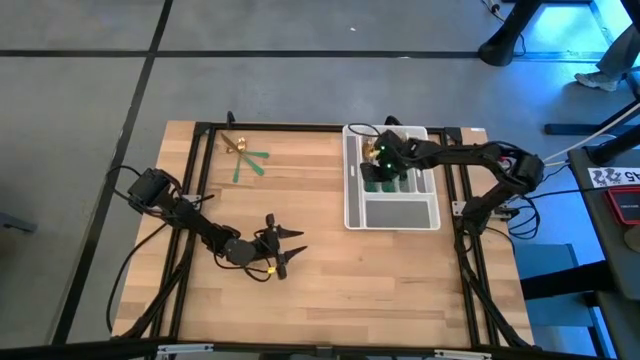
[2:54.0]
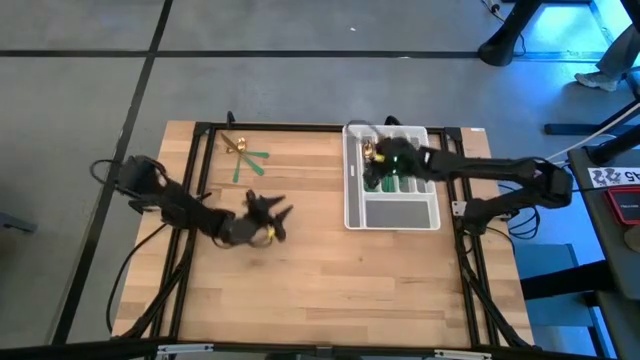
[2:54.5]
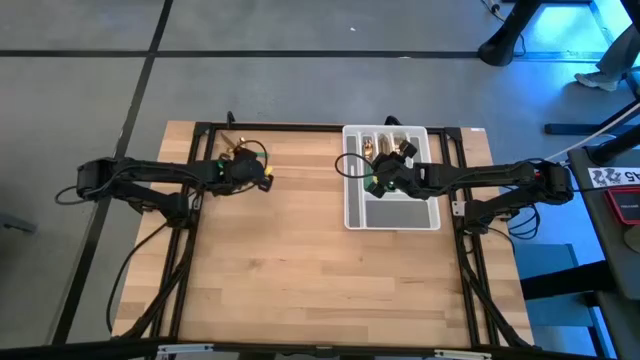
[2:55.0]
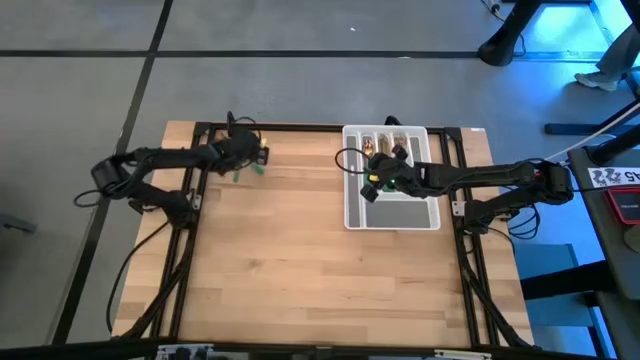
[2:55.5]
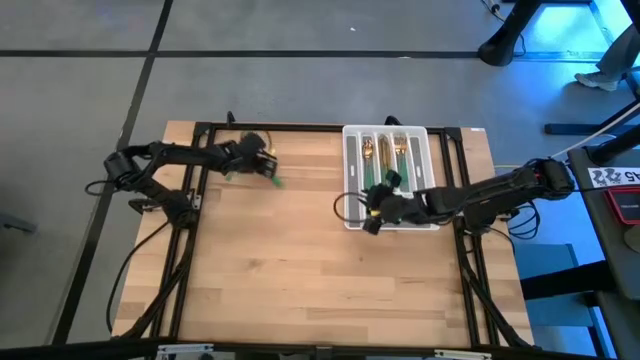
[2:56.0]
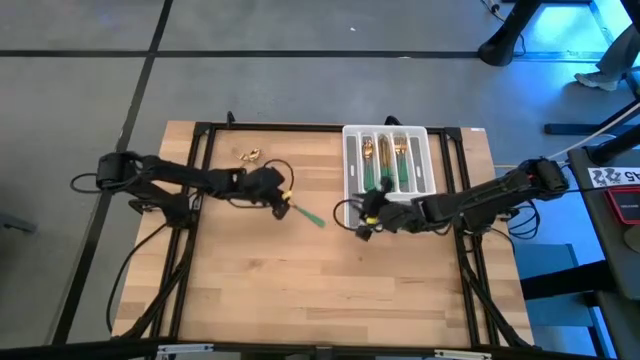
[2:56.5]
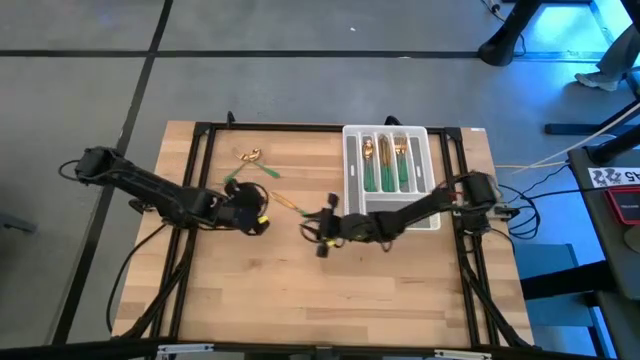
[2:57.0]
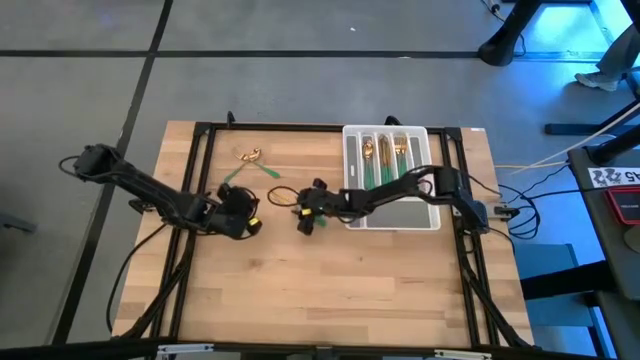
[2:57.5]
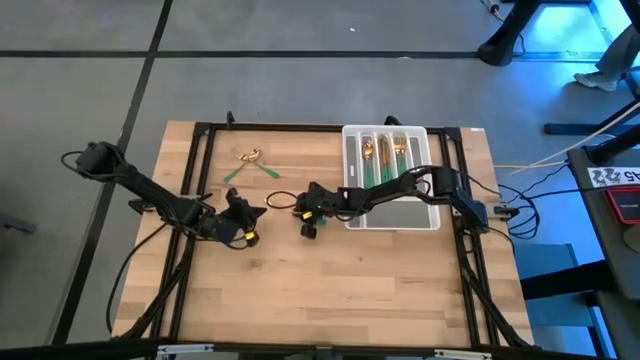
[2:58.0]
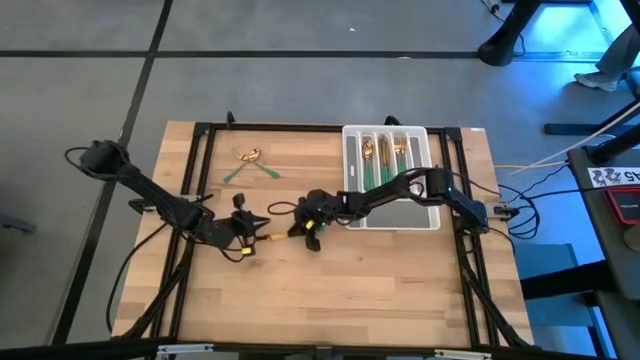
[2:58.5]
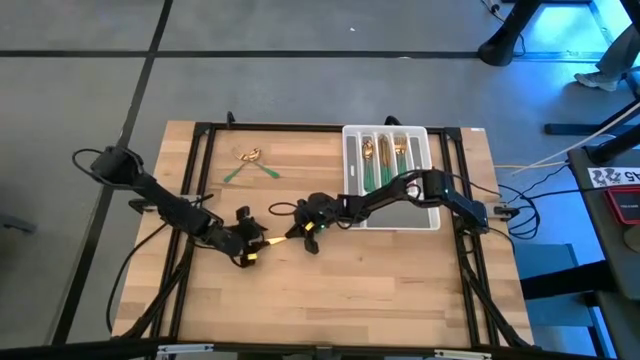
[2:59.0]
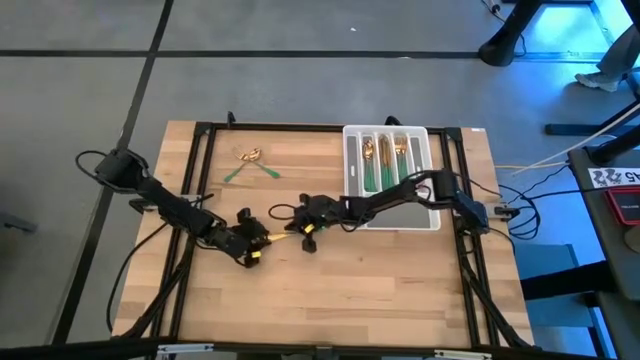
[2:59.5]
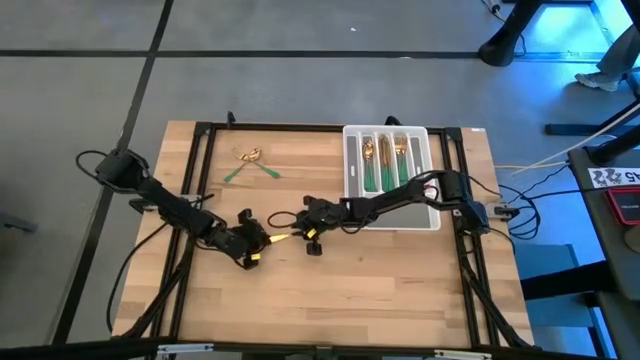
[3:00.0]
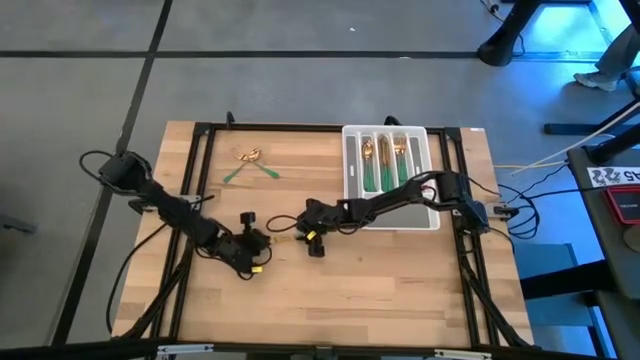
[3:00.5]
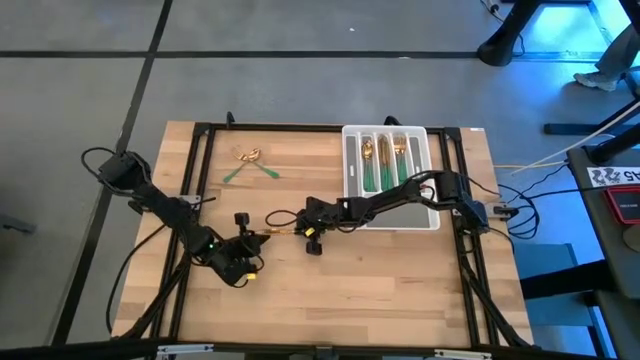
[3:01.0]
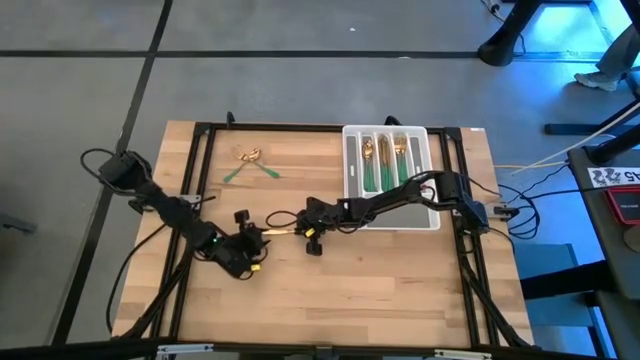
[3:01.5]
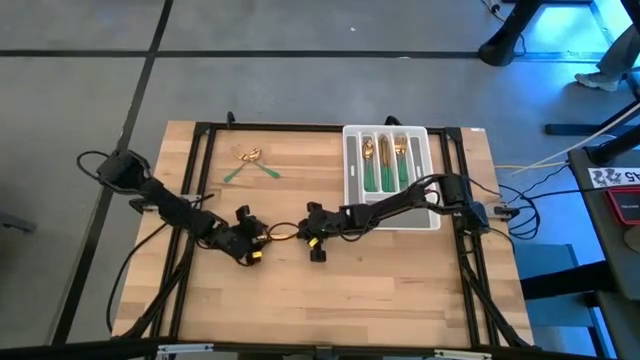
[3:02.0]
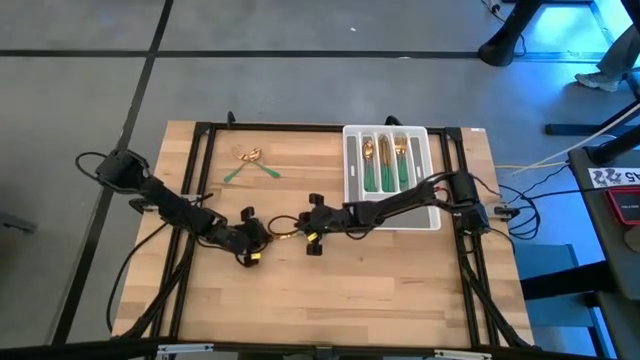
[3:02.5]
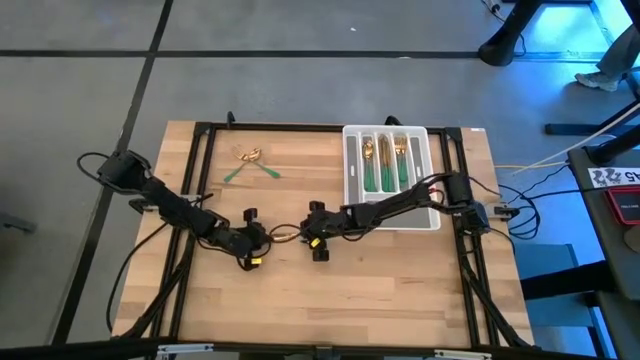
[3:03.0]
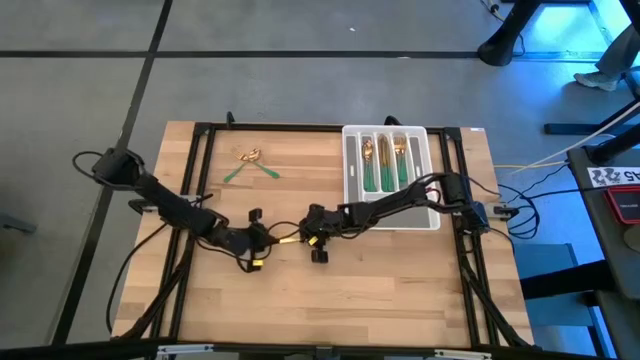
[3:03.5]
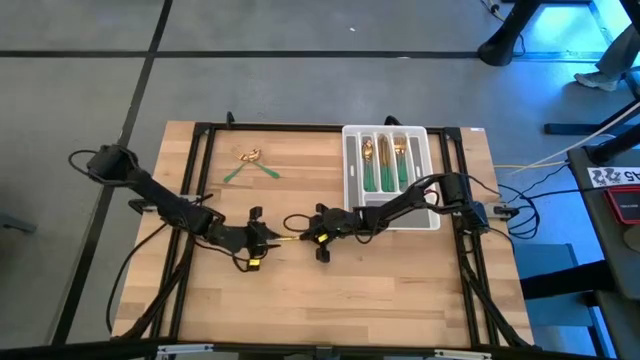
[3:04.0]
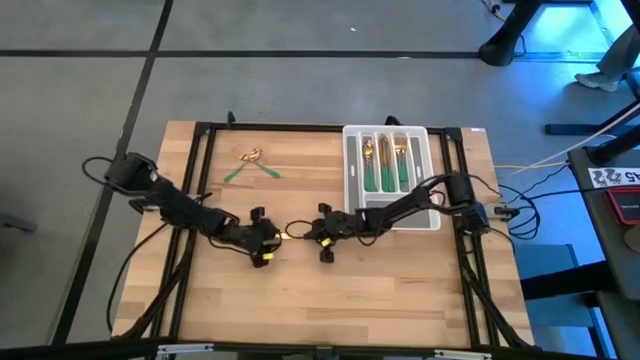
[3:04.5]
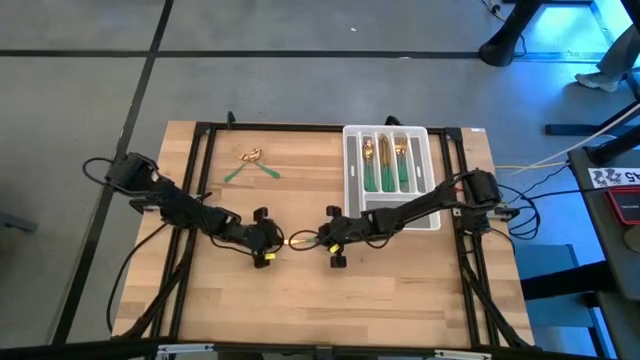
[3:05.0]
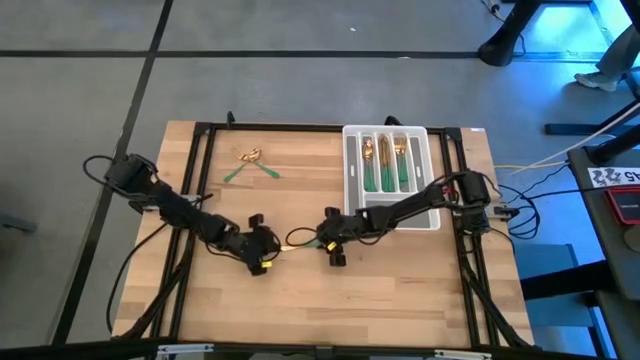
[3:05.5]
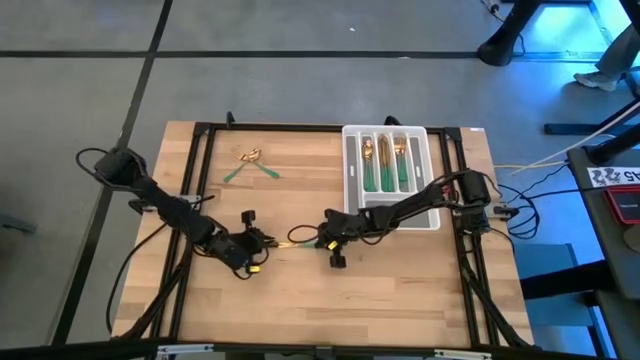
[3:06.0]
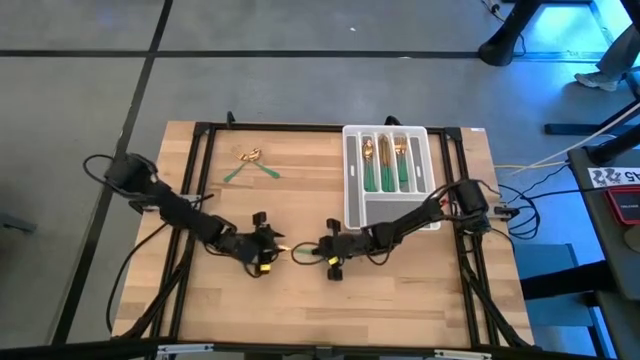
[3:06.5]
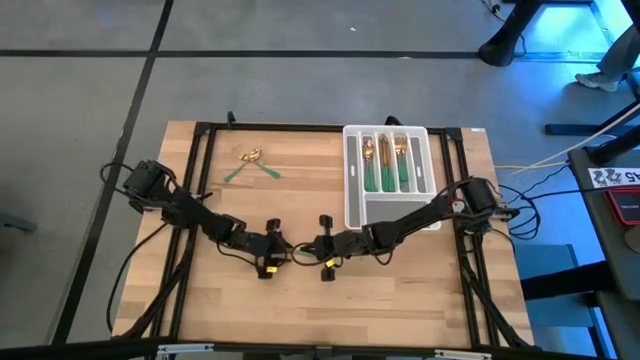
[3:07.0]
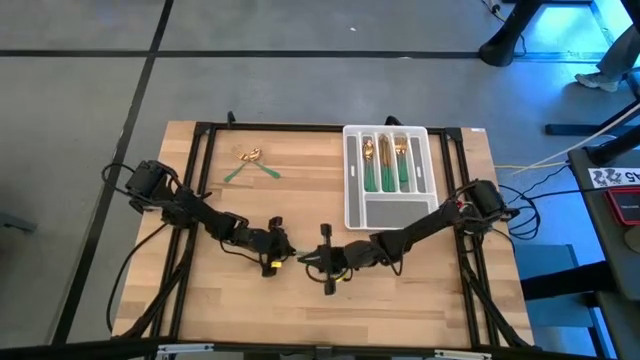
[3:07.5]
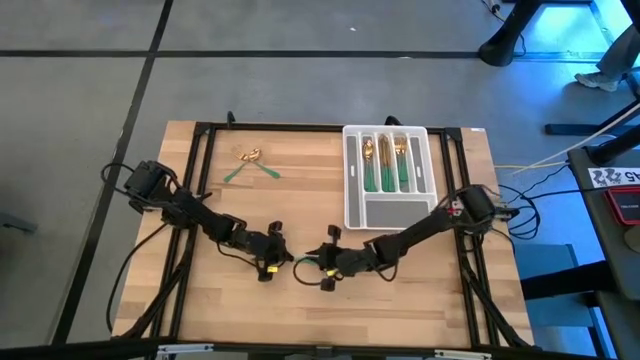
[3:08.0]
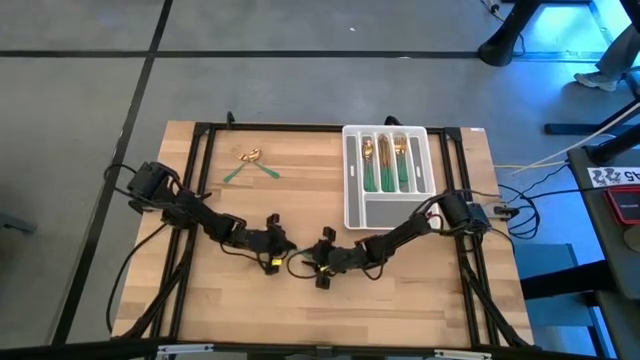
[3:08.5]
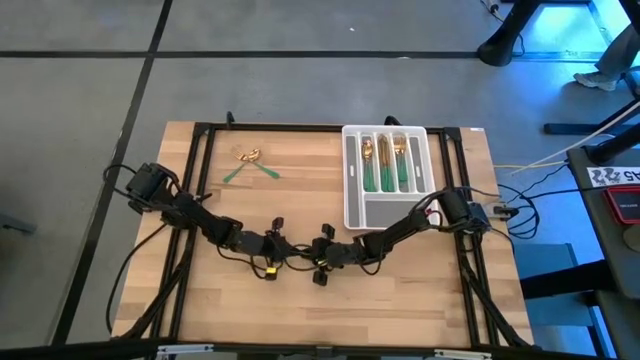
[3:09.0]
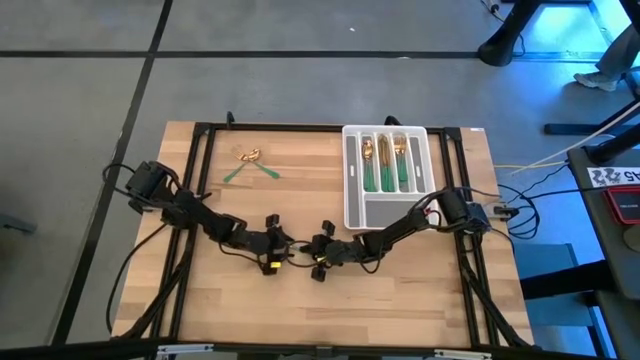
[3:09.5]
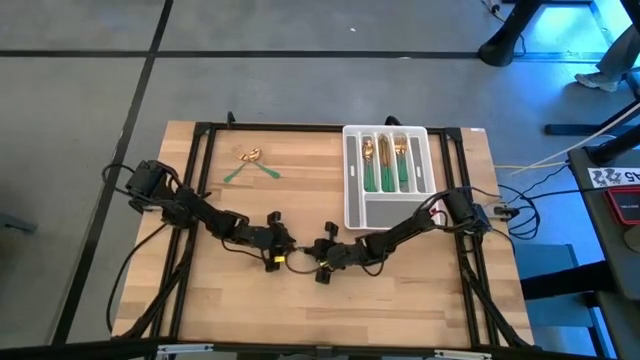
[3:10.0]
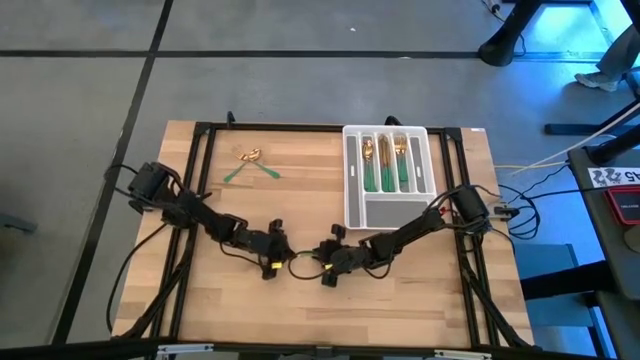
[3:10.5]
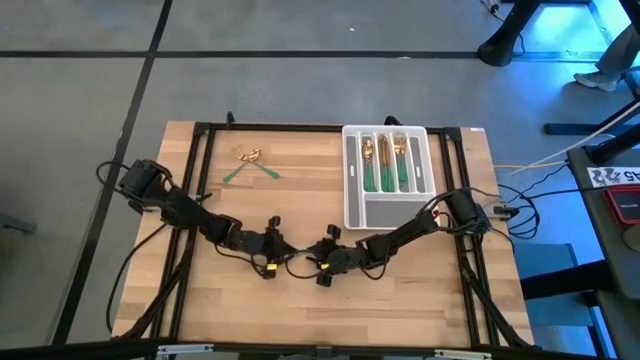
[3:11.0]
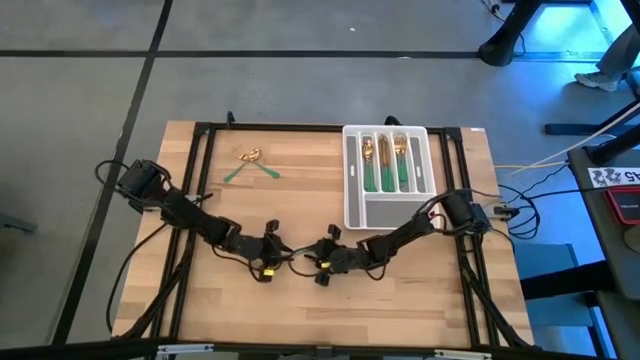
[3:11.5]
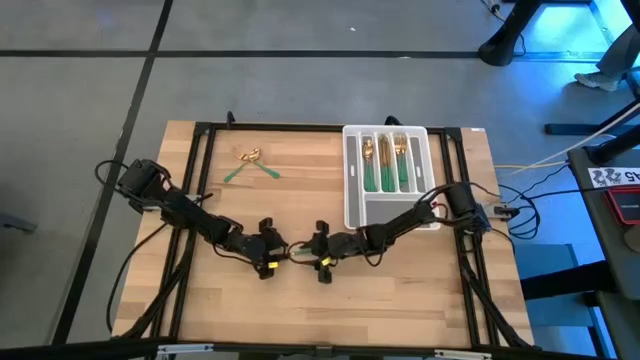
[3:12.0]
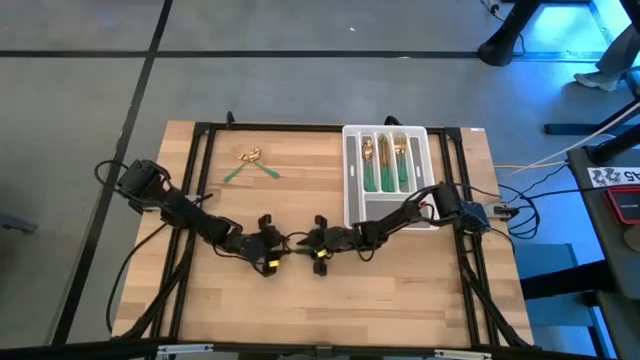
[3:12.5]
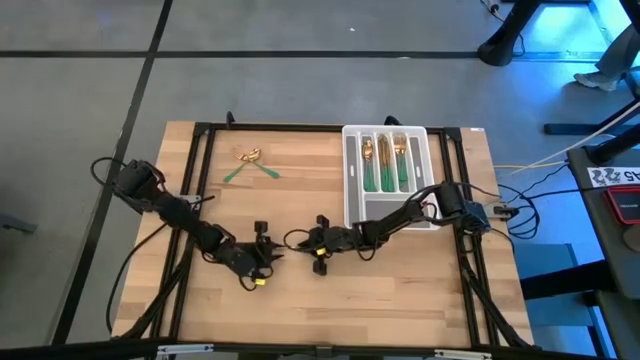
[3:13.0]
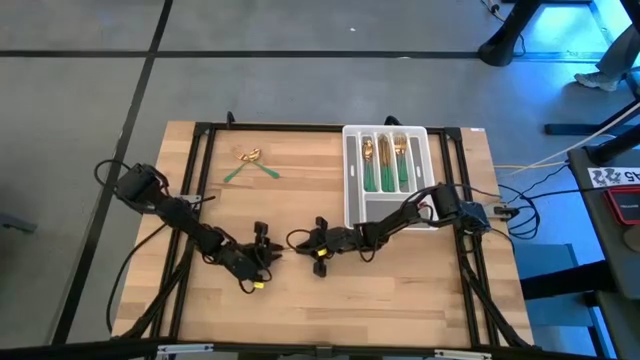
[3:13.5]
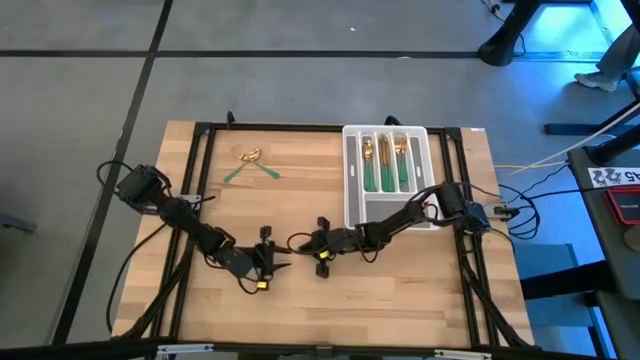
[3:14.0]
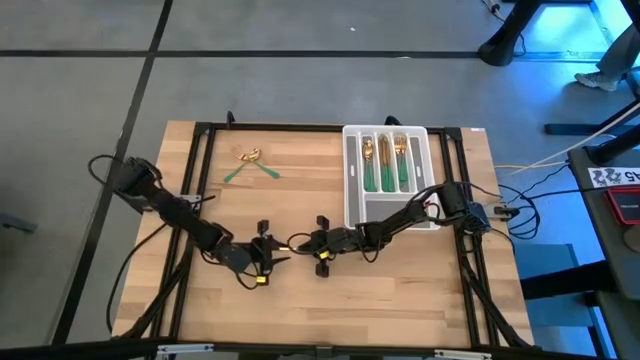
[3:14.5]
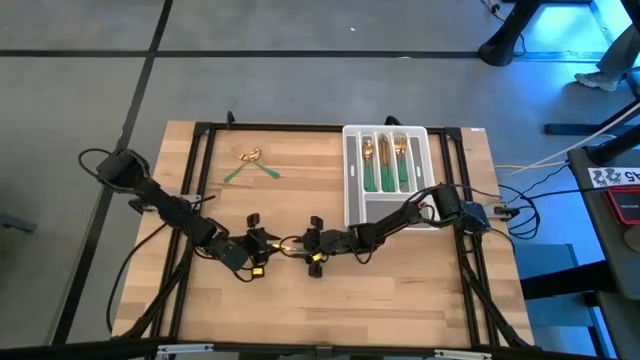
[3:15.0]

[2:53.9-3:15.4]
Task: Sort silverware
Put the green knife into the silverware tray

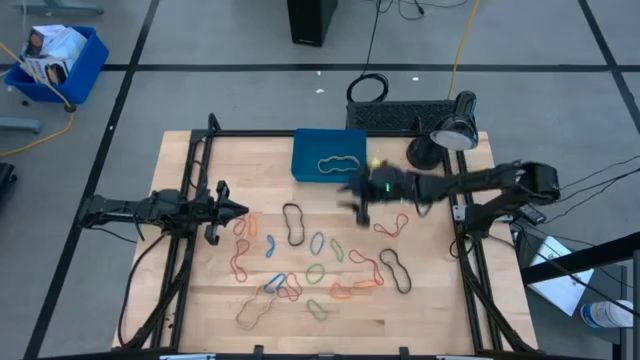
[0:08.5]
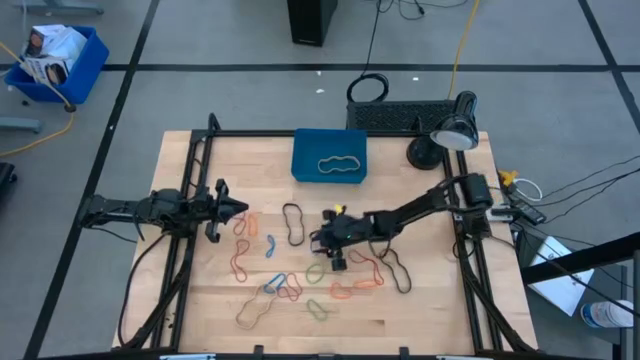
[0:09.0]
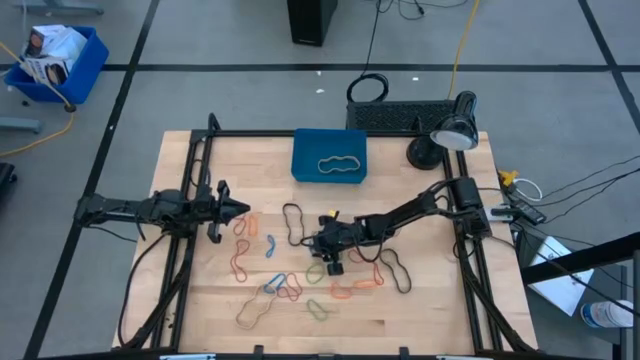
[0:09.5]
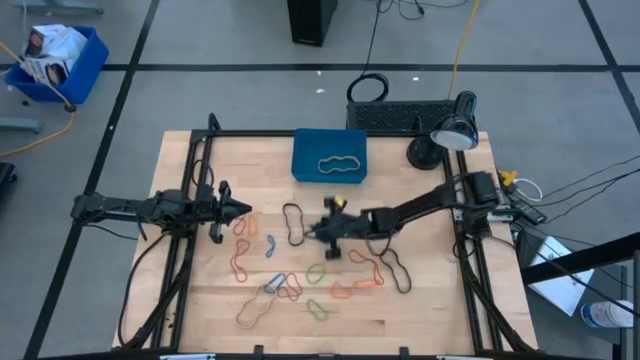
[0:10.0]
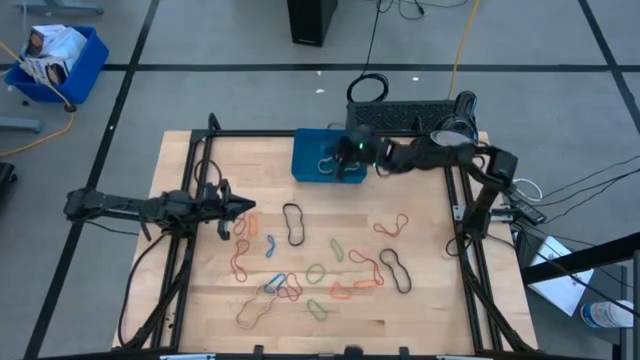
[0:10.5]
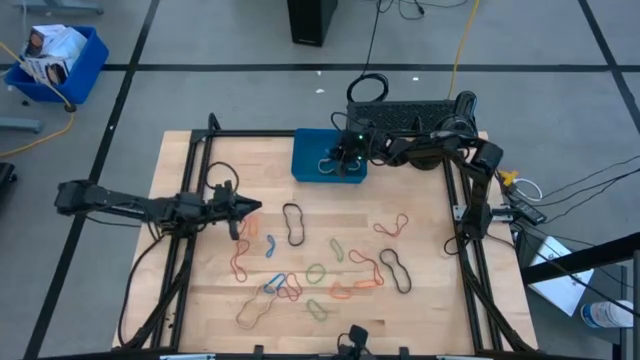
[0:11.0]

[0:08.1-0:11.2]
Task: Pick and place rubber bands into bin
Put the blue rubber band into the blue bin
